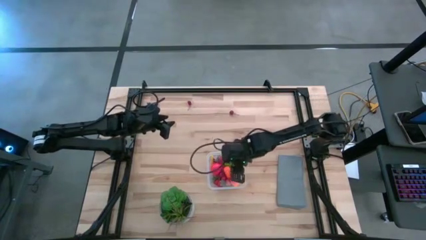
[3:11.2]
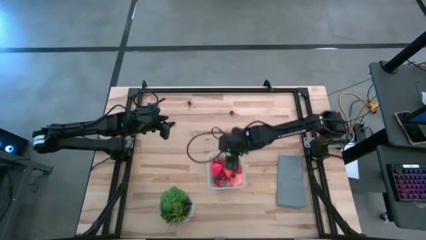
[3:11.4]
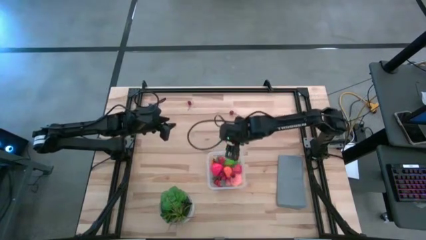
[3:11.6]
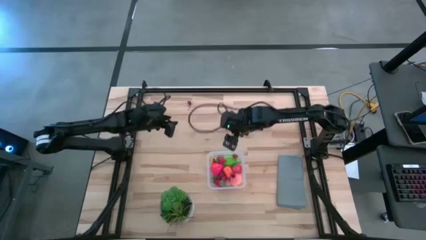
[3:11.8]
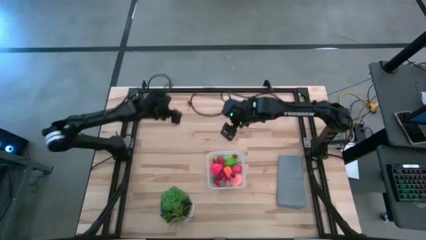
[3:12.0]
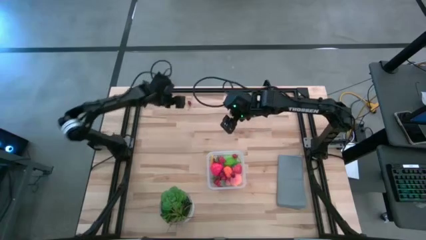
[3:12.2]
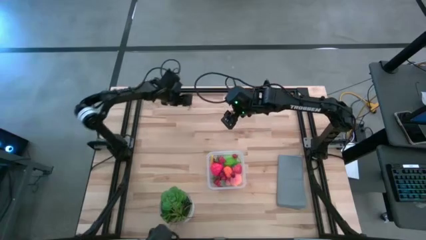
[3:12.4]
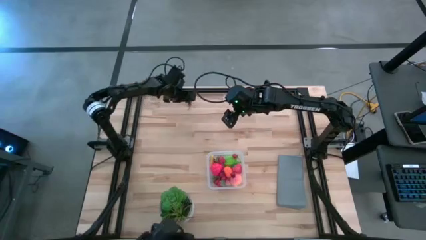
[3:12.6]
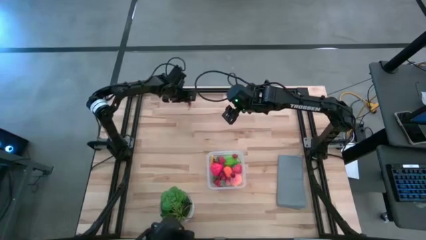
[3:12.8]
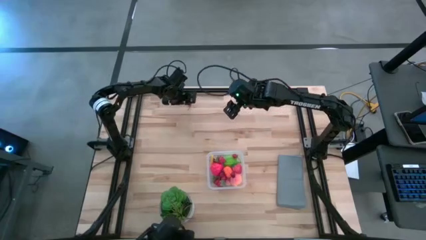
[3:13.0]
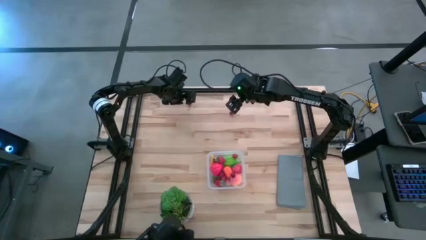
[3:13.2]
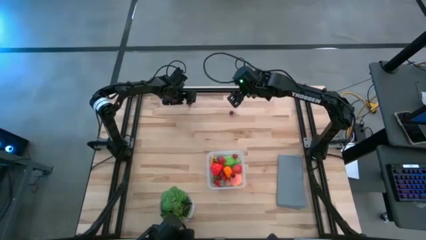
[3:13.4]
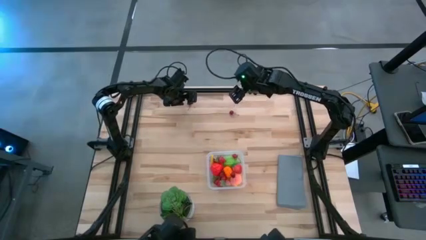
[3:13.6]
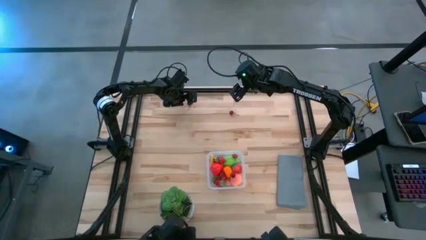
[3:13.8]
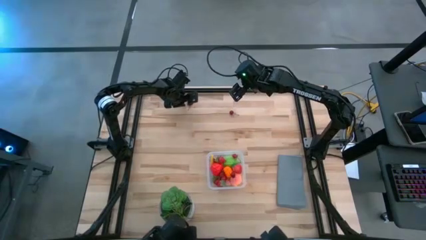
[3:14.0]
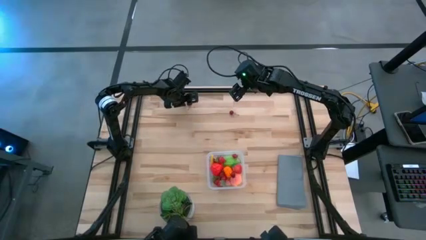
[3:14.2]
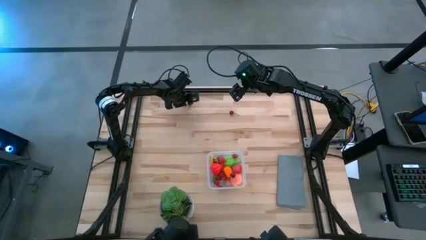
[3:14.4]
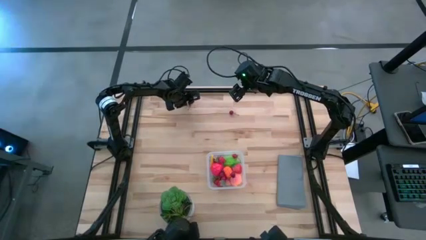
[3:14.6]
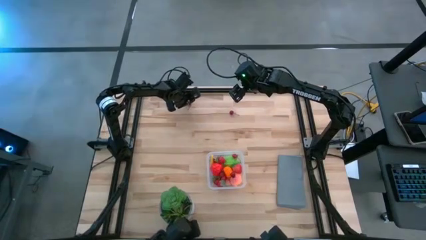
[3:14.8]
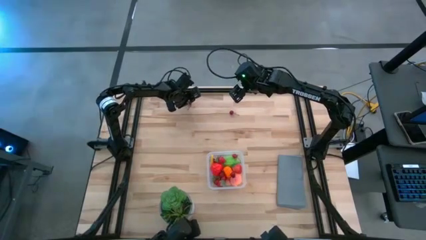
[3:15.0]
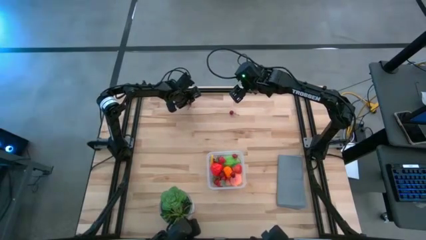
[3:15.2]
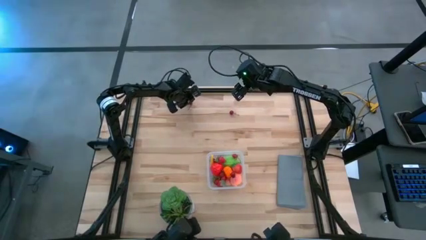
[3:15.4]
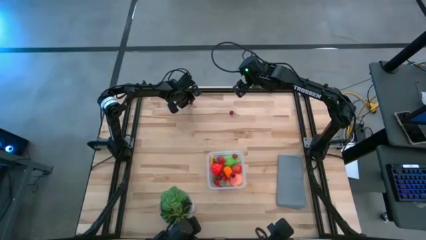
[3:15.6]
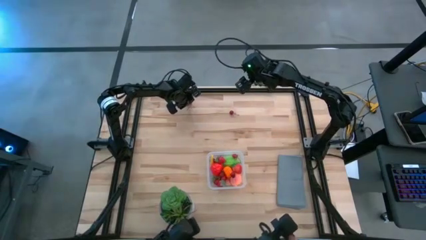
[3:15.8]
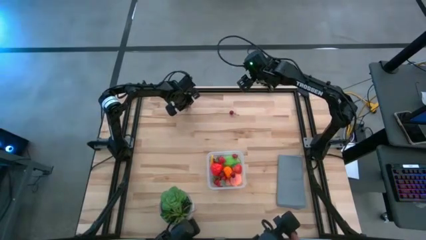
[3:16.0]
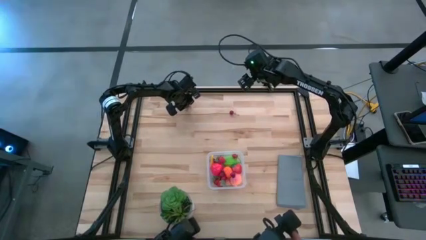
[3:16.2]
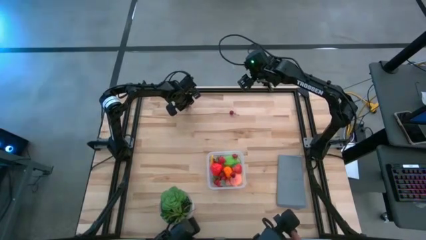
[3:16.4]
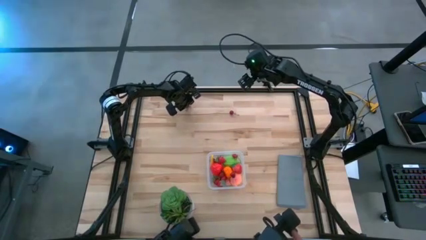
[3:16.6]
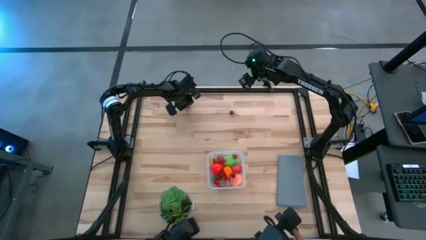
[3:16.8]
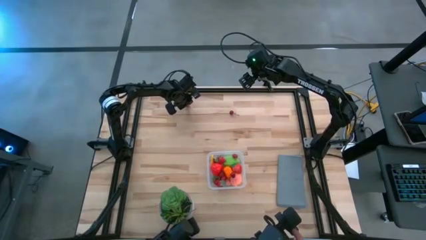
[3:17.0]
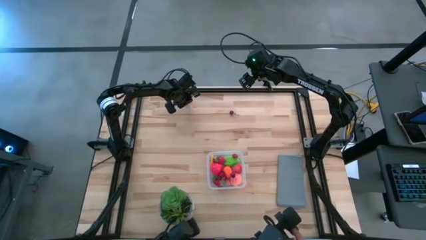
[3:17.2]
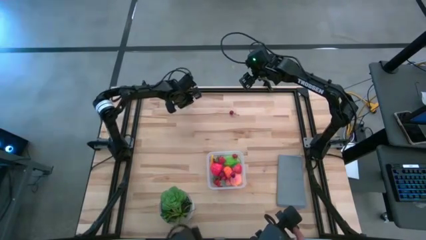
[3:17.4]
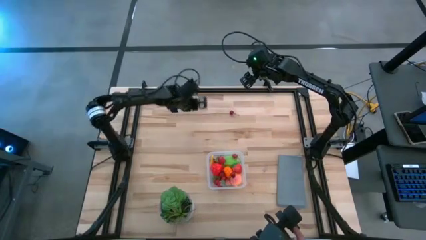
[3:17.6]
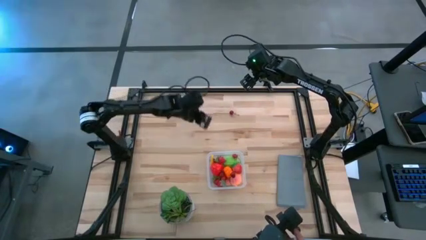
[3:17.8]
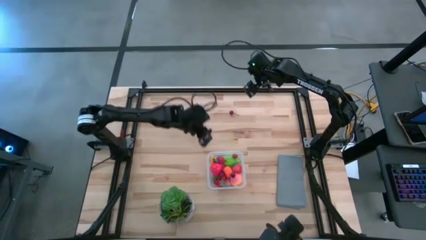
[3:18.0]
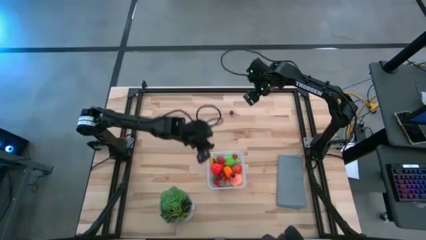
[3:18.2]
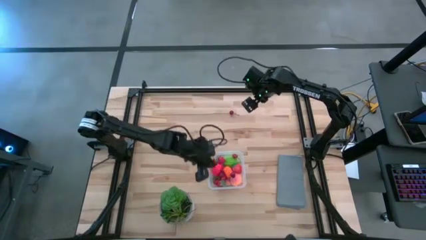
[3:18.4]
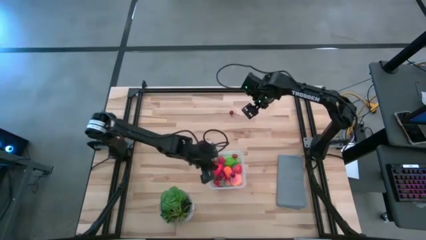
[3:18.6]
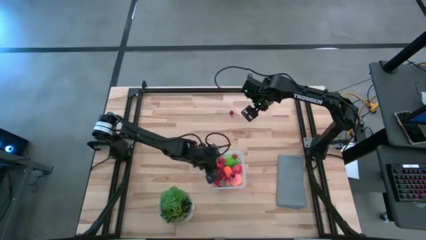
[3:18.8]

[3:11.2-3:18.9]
Task: Pick and placing Produce into tupperware
Put the red cherry into the transparent bin

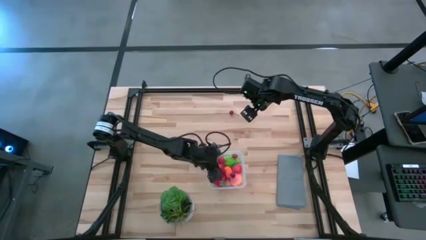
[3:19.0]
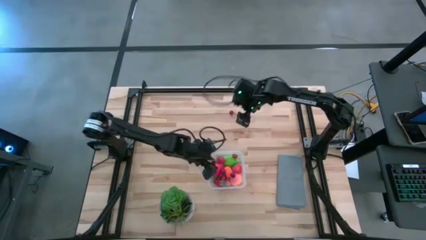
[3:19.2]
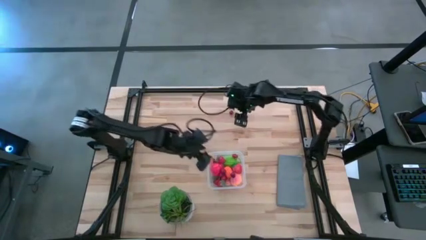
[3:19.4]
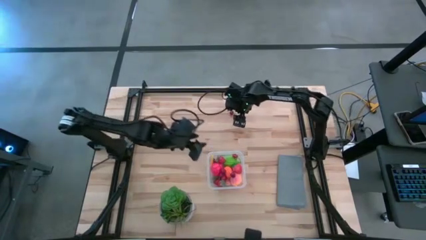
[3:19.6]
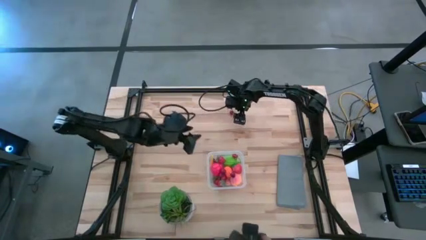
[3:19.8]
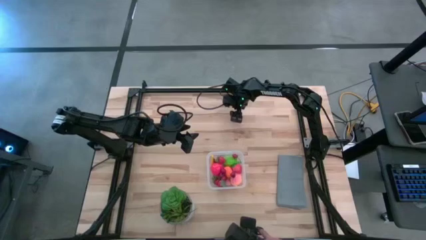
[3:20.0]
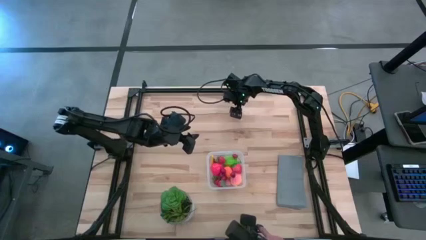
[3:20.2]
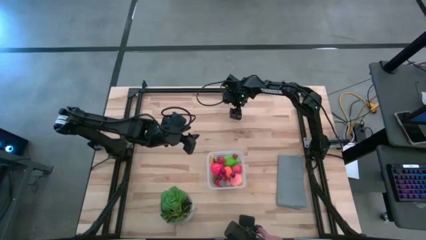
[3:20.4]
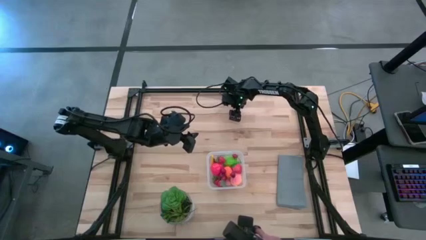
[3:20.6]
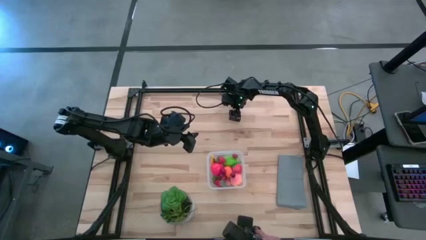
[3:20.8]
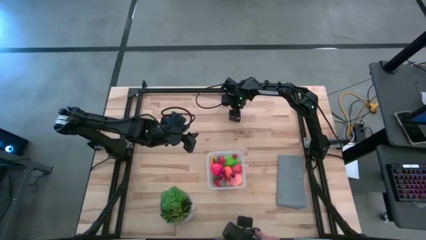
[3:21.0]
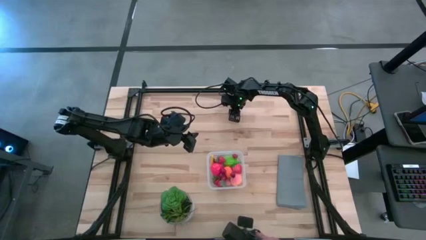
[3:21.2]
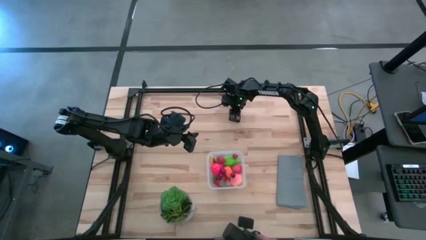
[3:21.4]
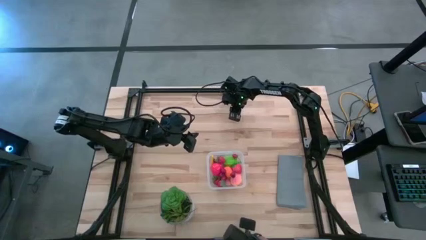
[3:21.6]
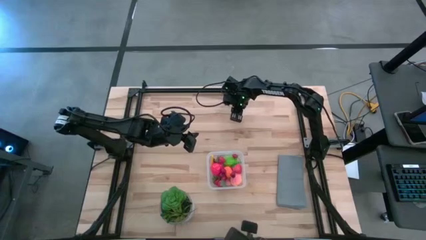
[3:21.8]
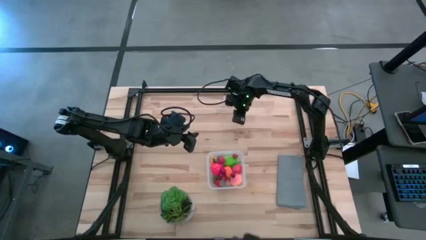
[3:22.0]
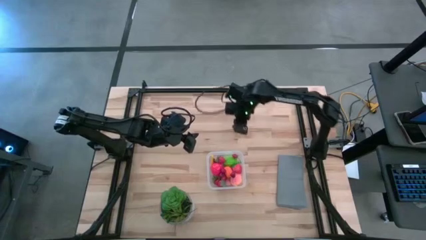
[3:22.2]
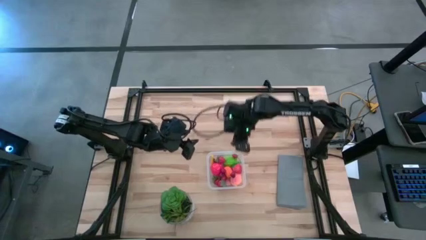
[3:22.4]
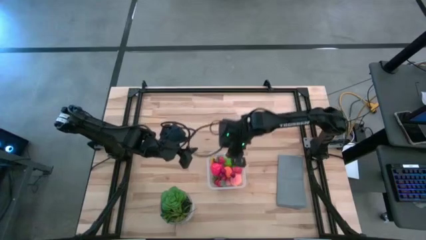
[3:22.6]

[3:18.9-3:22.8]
Put the red cherry into the transparent bin

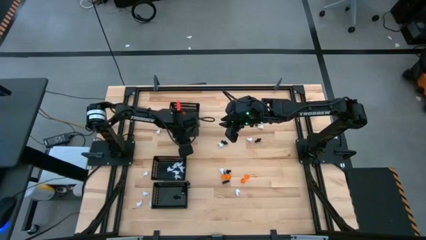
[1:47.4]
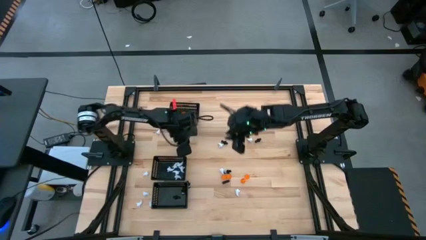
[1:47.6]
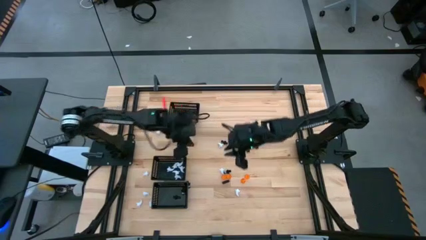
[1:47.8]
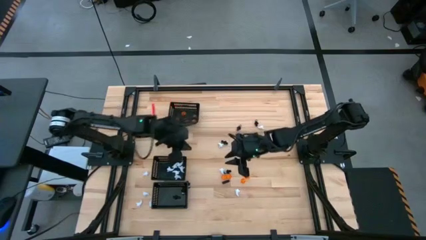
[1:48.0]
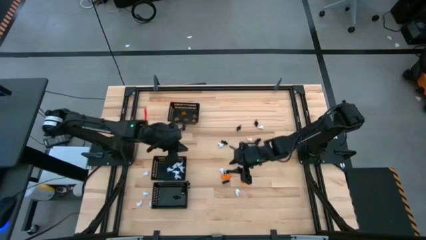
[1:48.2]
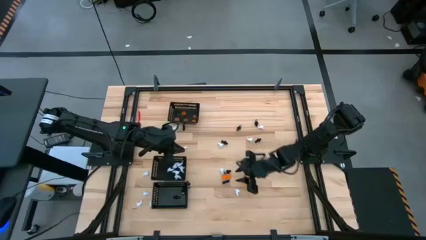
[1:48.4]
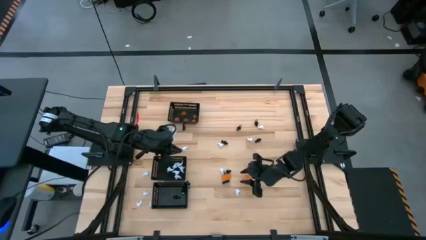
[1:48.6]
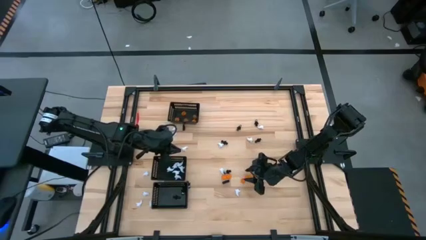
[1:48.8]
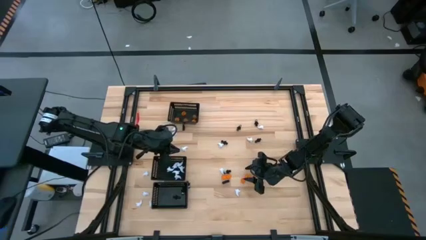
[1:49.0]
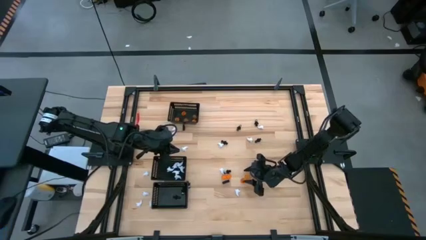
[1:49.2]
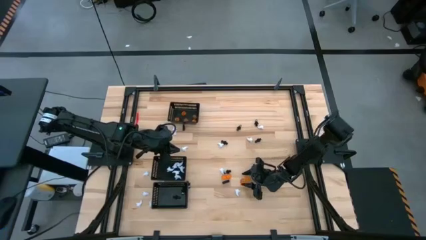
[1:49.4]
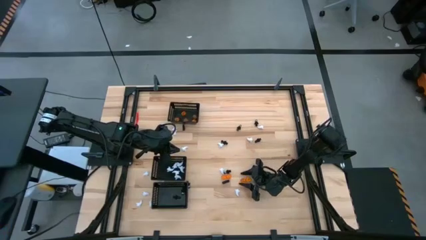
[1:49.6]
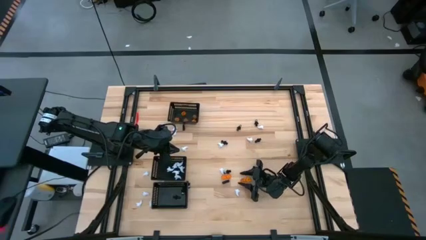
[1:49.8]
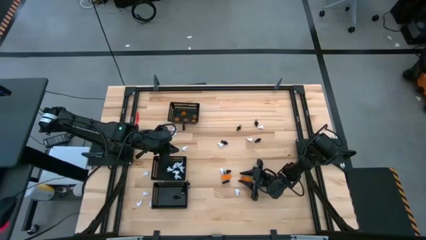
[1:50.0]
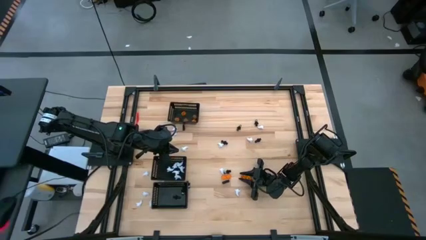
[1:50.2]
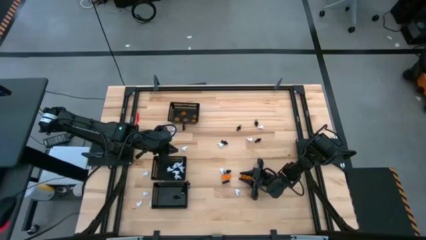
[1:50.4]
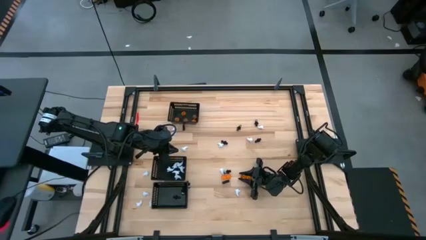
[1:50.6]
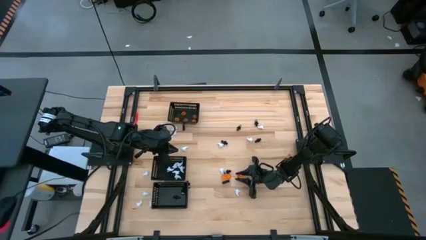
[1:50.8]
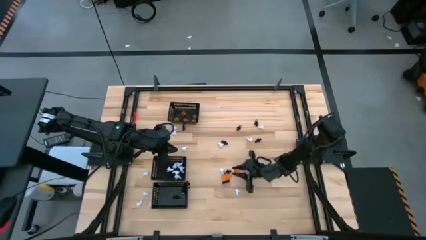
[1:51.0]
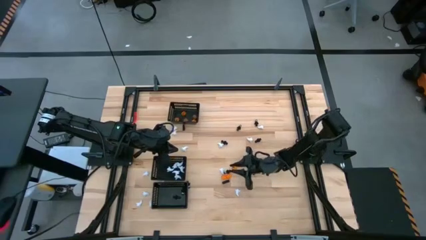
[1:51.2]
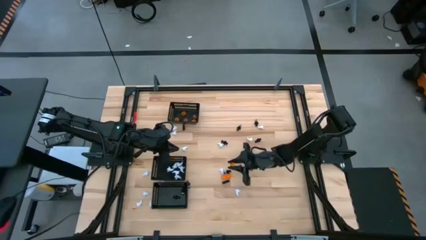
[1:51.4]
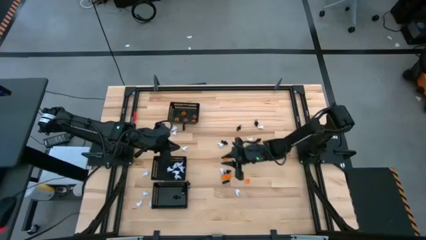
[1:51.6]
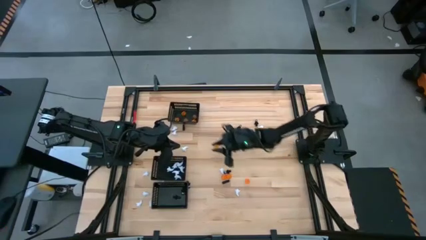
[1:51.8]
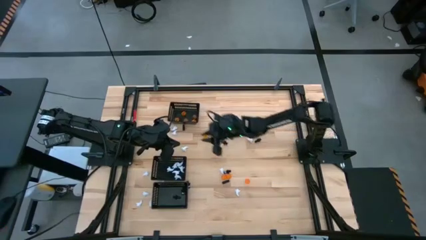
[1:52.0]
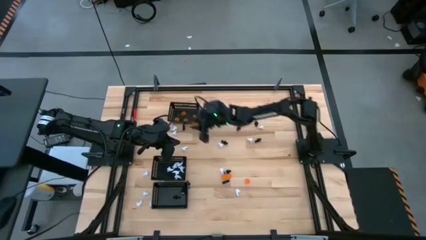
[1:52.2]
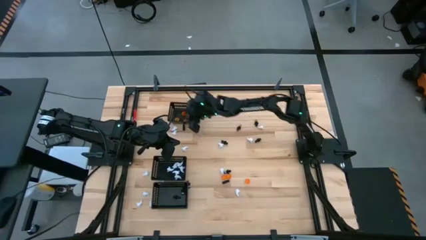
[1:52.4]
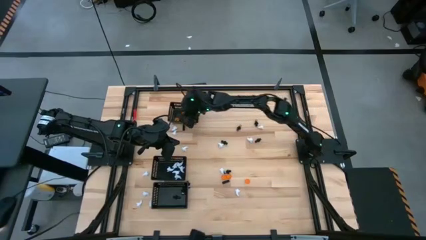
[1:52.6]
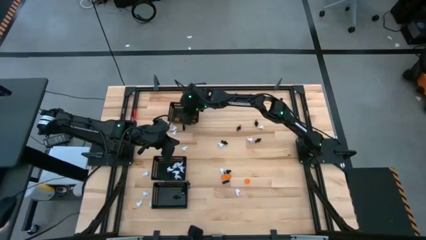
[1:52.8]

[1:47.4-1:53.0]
Task: Sort Halloween decoration
Put the orange pumpkin toy into the top black bin
